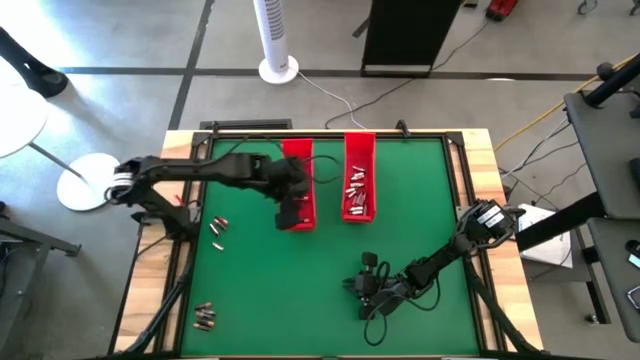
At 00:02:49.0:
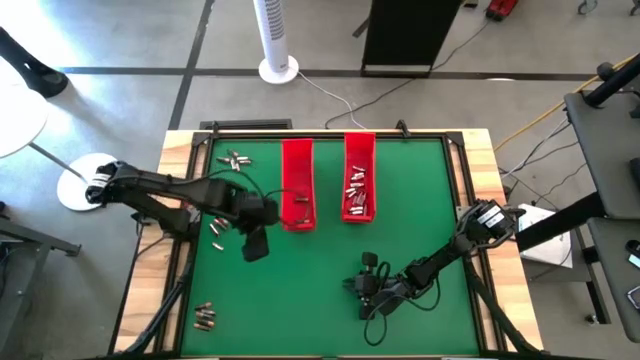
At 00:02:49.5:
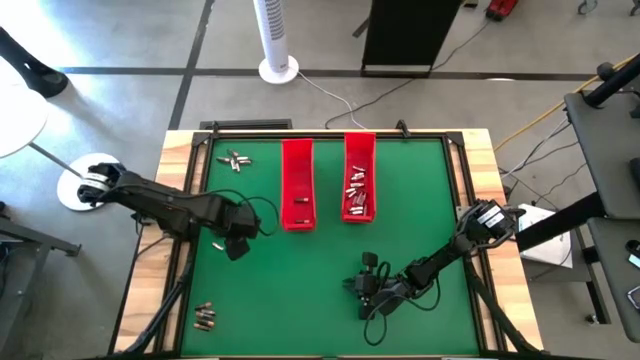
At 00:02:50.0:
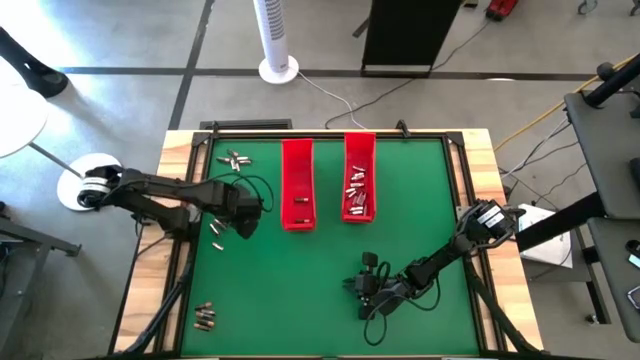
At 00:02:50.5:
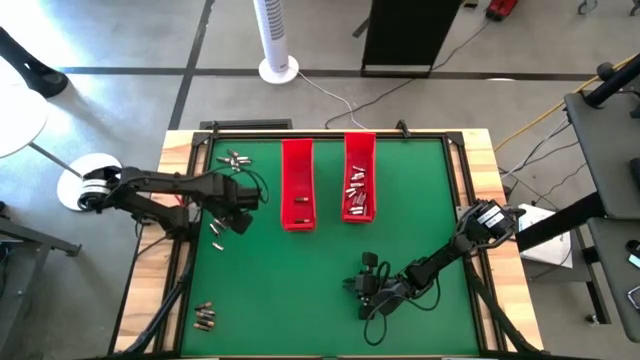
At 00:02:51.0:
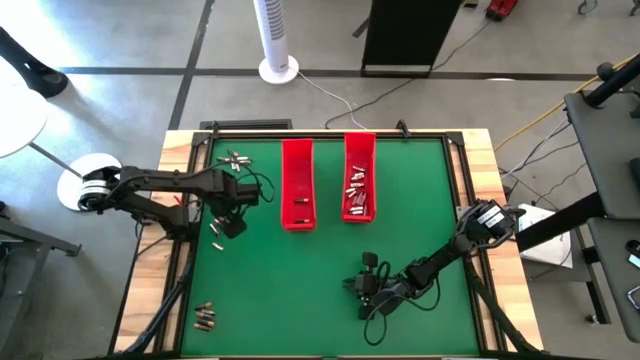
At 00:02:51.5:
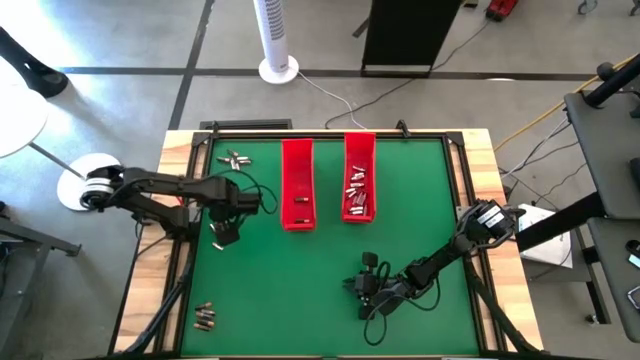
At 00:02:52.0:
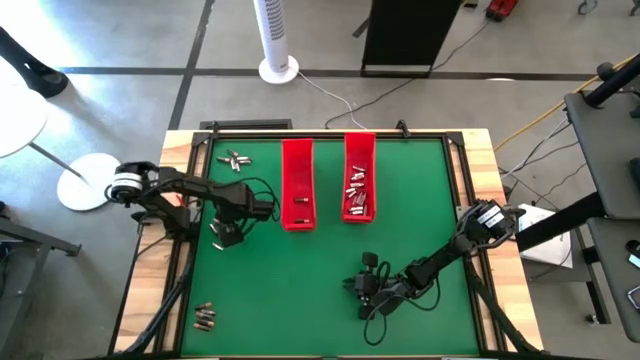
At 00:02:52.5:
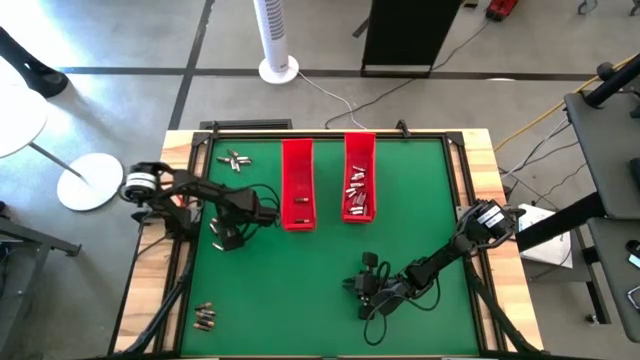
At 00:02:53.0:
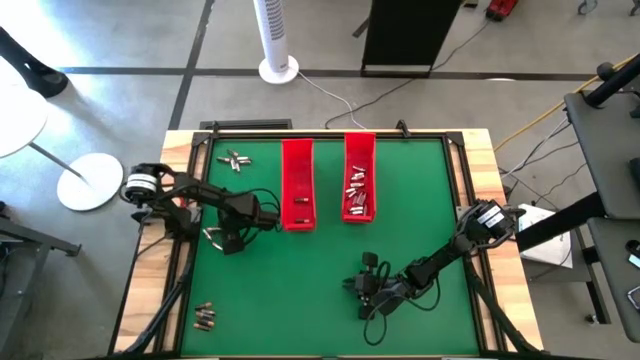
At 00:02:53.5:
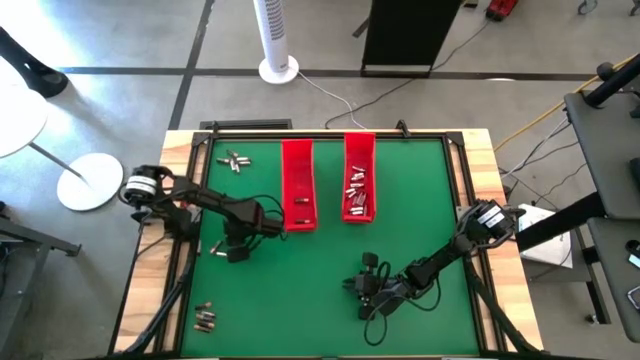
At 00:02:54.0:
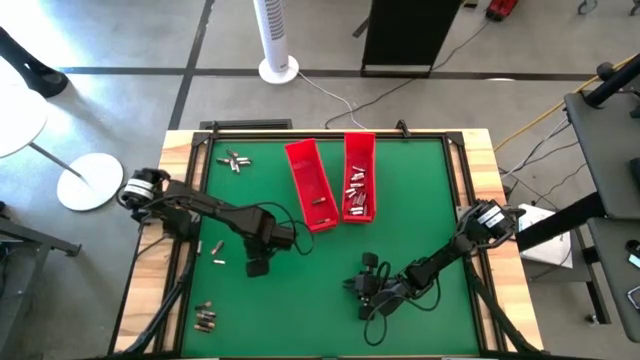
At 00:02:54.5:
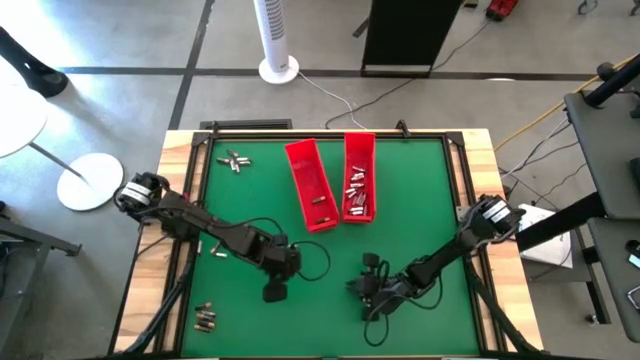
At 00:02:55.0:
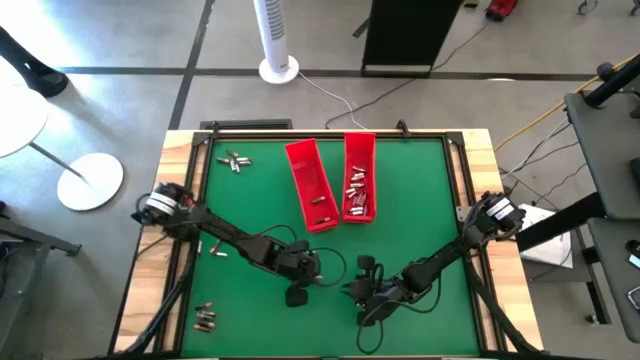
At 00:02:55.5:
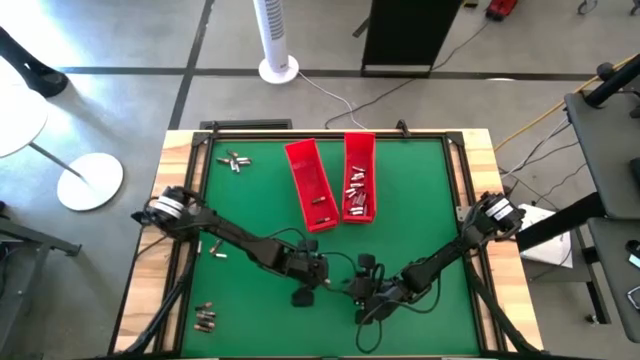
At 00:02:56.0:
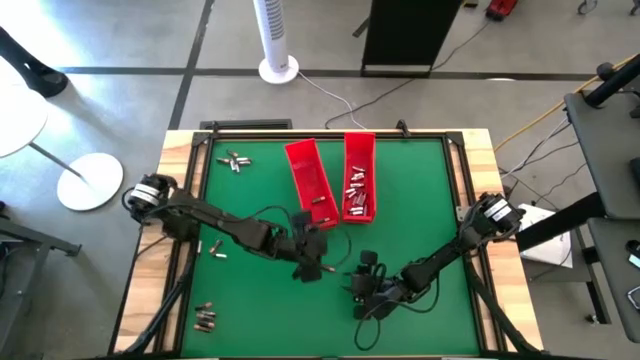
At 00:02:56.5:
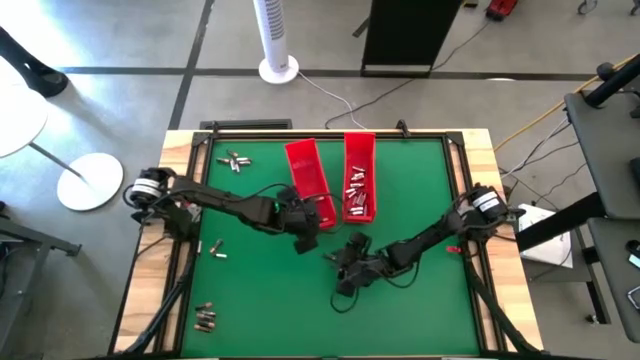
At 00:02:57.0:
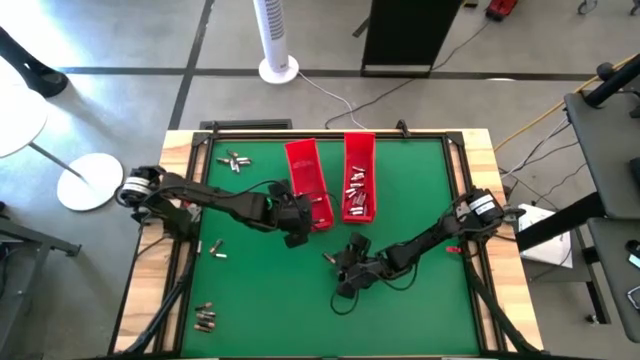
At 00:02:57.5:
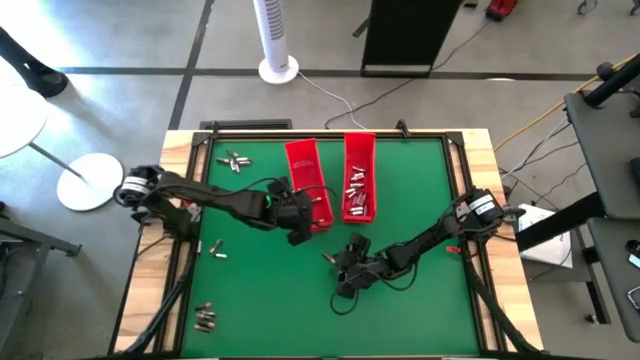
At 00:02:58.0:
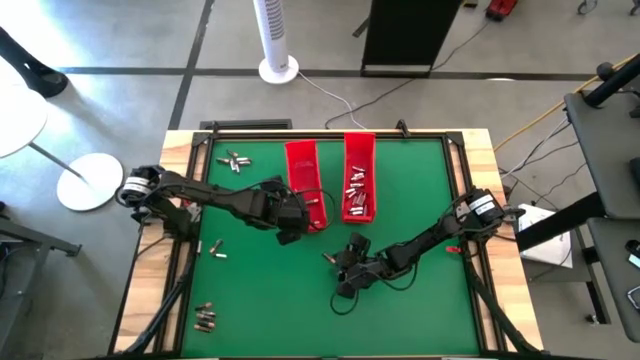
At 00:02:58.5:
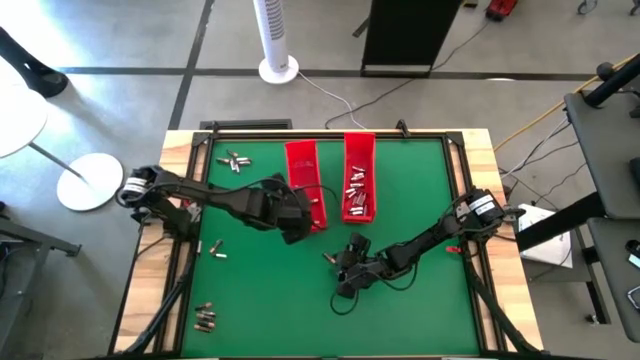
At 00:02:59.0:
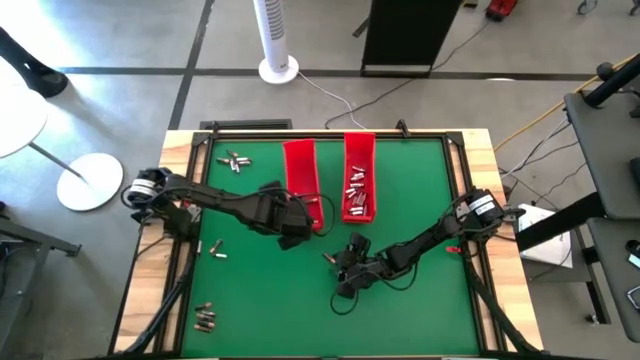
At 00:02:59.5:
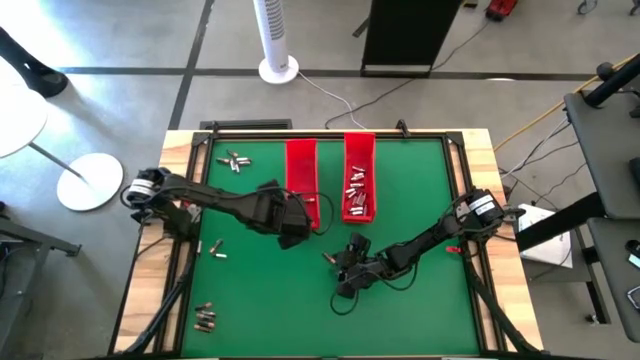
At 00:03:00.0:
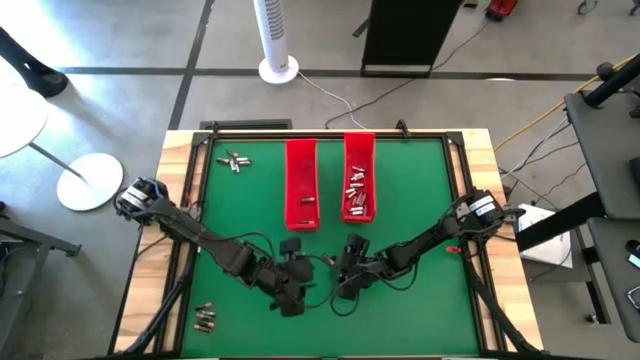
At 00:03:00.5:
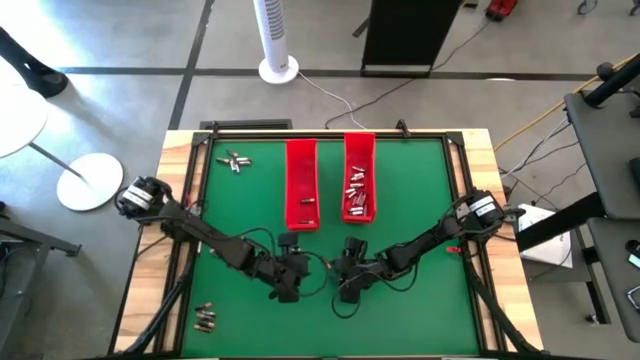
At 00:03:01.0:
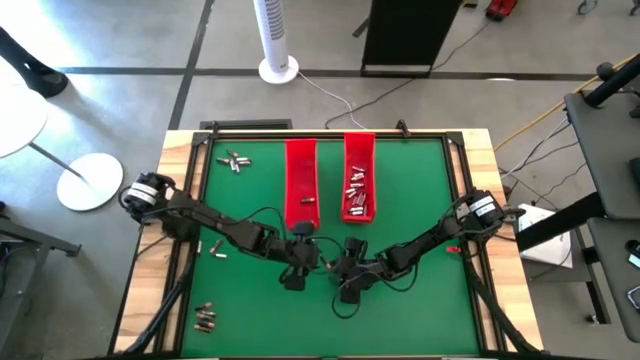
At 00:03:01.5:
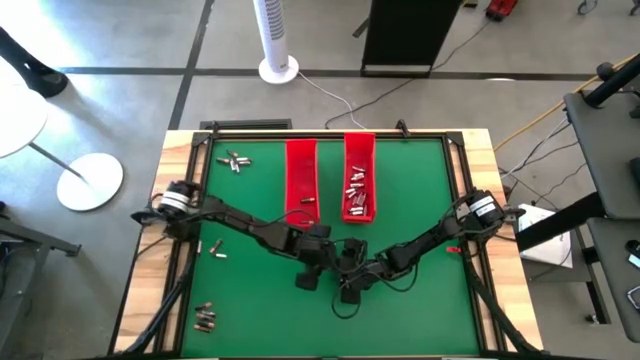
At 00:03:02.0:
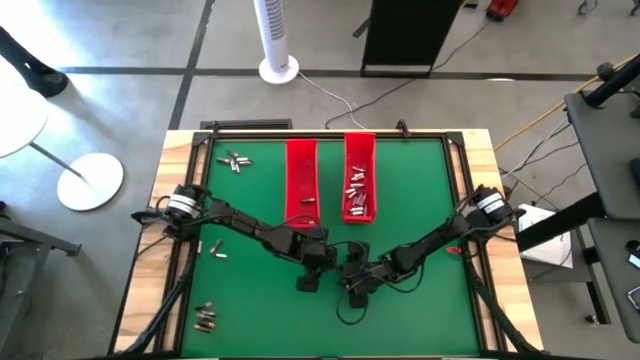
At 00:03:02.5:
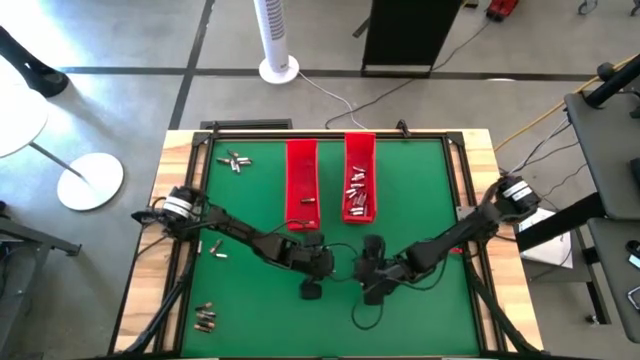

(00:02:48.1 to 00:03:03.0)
Task: Sort batteries
Put the black battery into the left red bin

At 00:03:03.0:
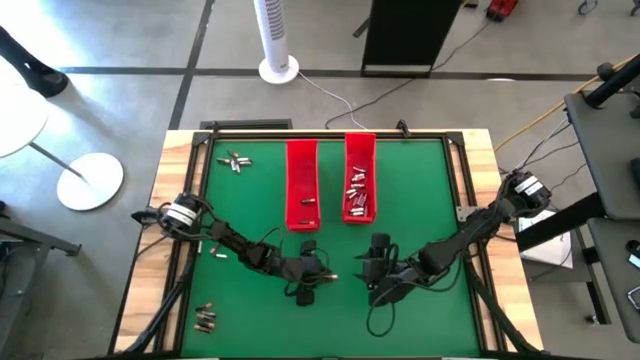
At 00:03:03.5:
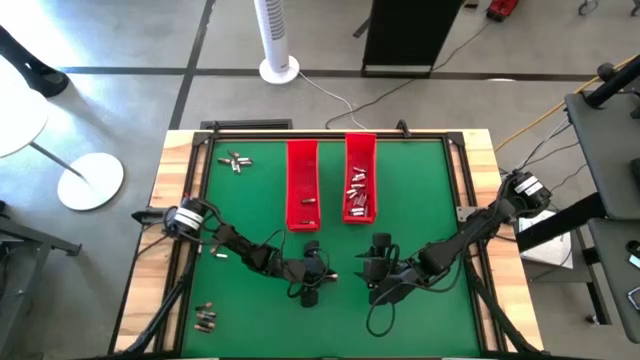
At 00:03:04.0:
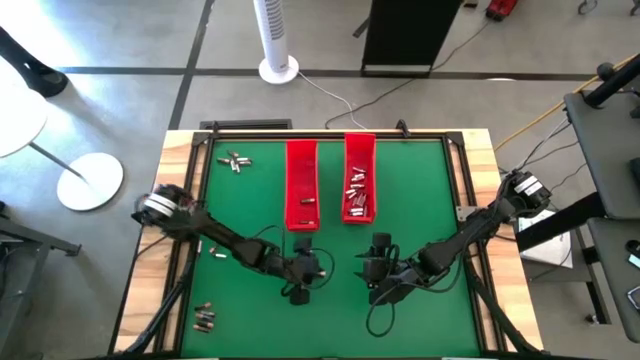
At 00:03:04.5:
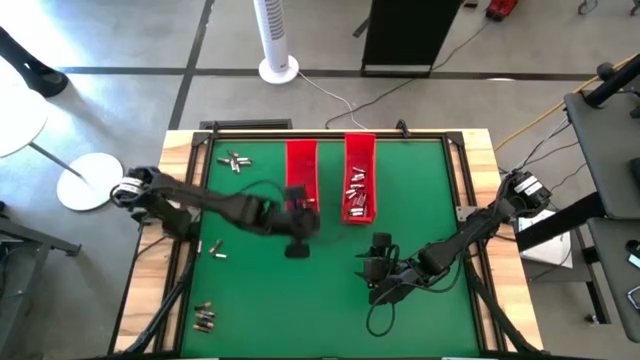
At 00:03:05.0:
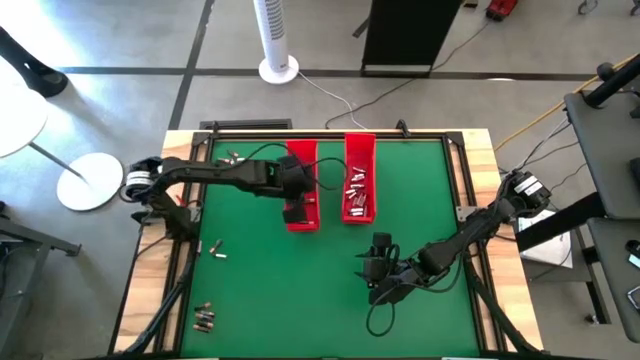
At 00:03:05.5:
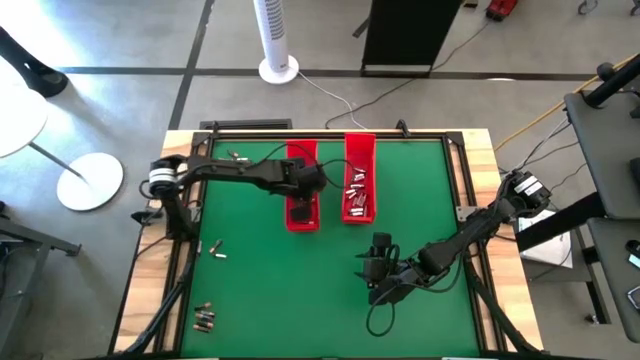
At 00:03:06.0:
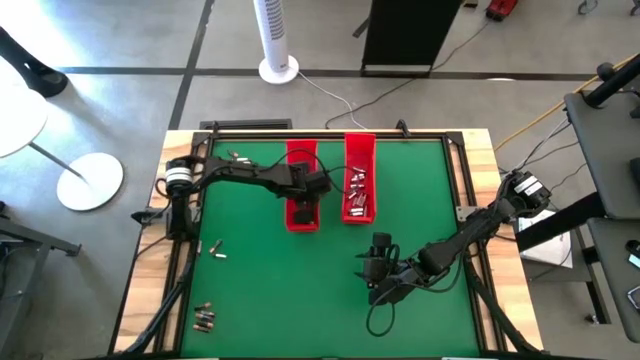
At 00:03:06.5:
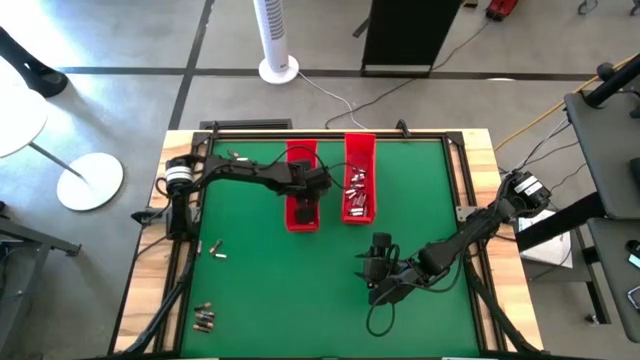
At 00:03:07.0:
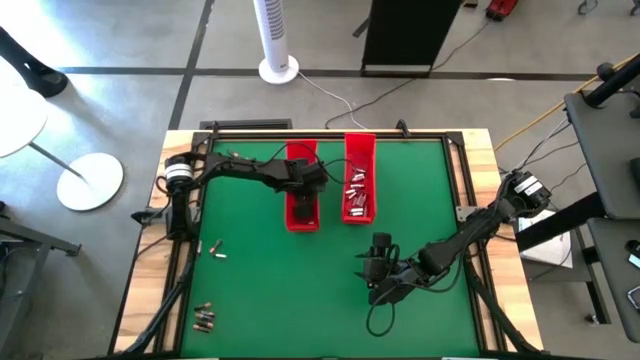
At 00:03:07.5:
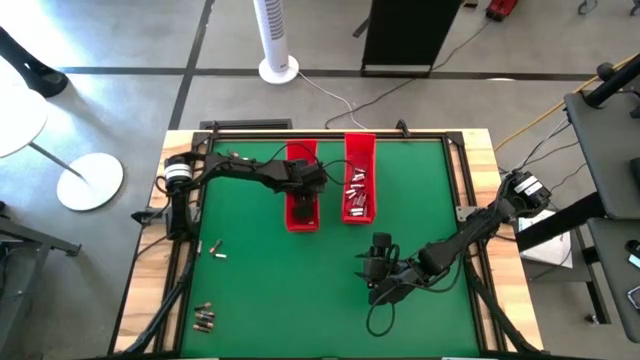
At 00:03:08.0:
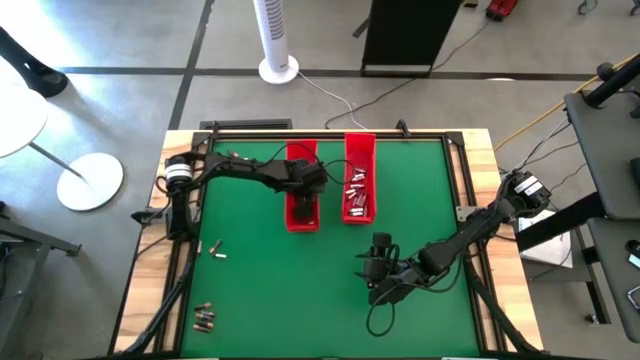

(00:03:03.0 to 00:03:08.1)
Put the black battery into the left red bin
